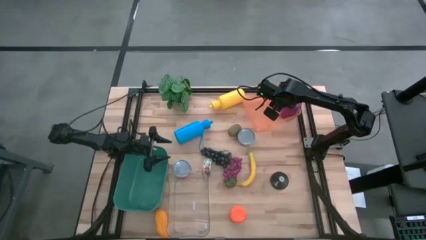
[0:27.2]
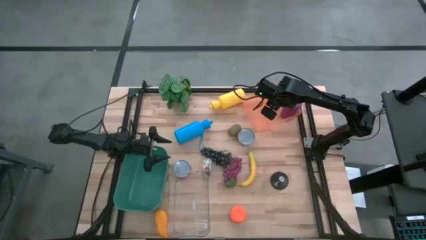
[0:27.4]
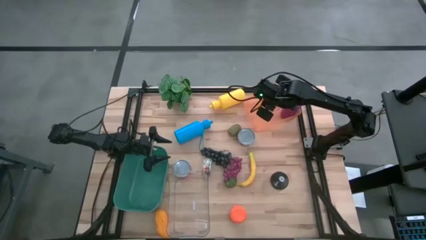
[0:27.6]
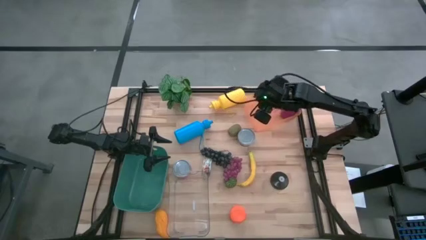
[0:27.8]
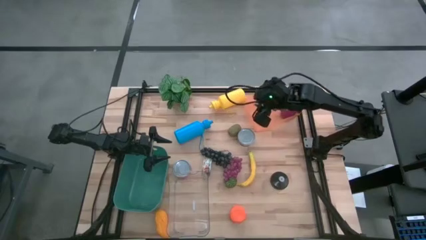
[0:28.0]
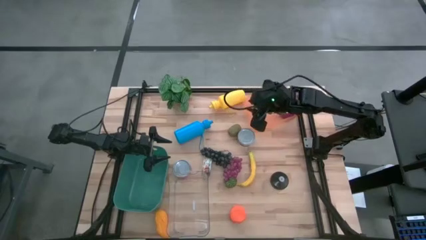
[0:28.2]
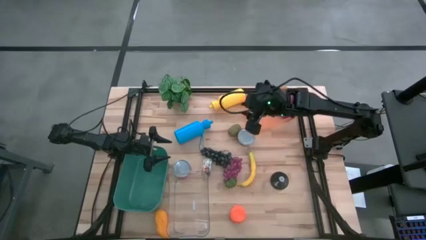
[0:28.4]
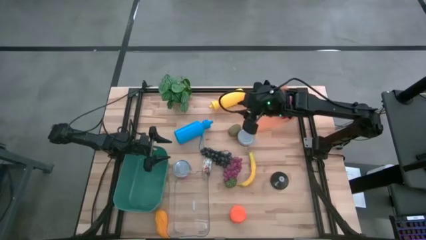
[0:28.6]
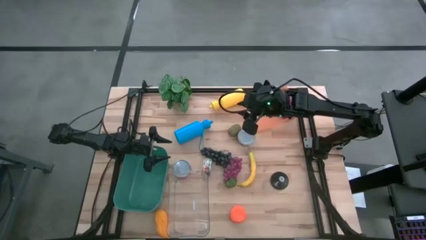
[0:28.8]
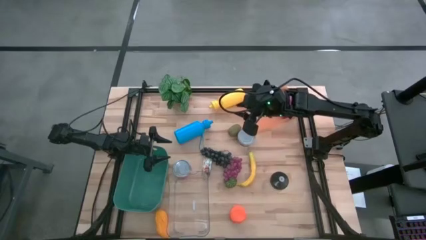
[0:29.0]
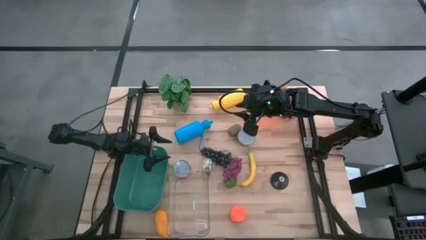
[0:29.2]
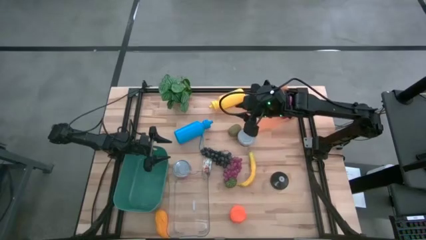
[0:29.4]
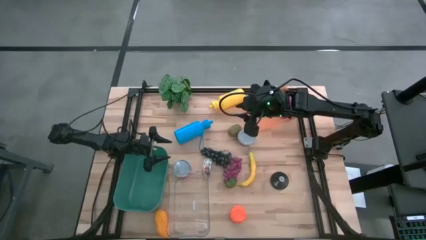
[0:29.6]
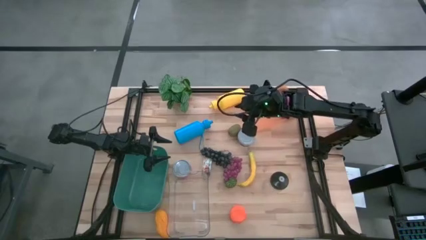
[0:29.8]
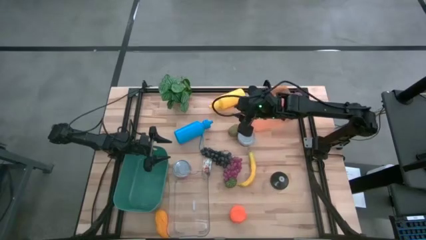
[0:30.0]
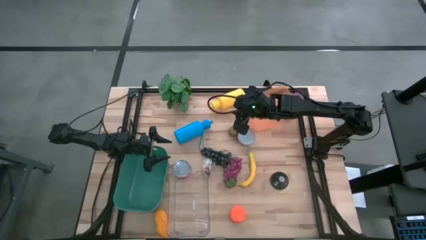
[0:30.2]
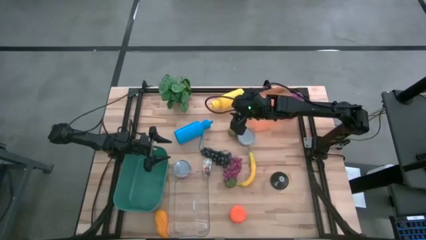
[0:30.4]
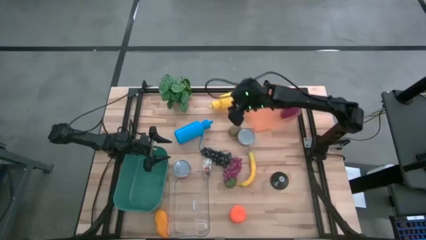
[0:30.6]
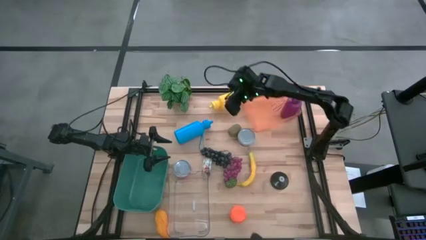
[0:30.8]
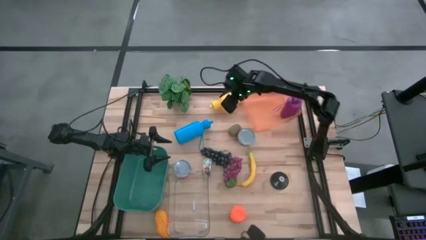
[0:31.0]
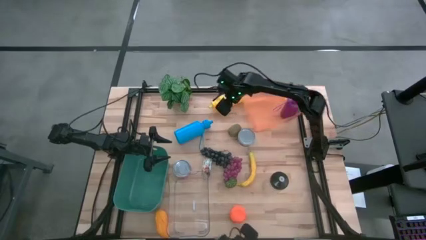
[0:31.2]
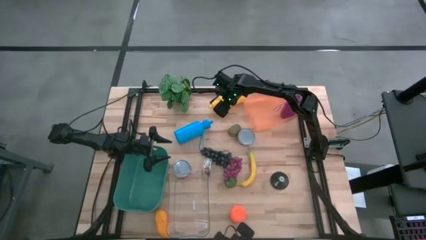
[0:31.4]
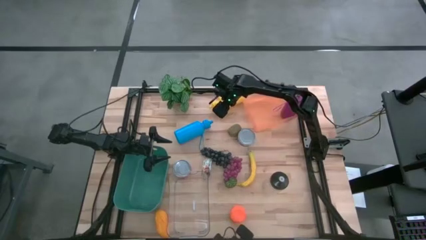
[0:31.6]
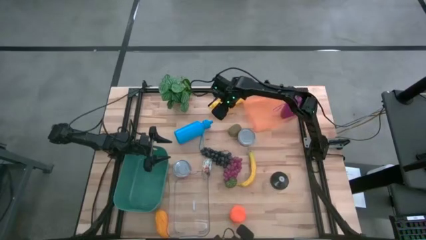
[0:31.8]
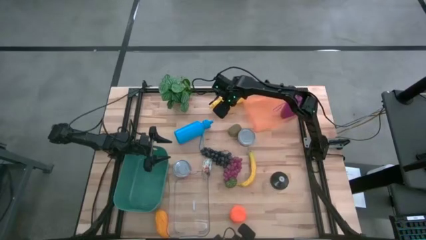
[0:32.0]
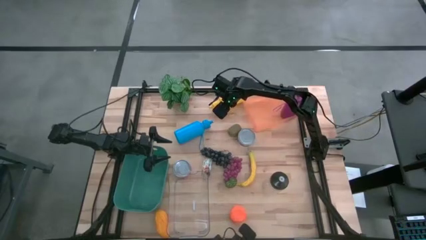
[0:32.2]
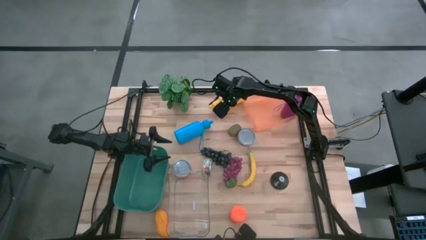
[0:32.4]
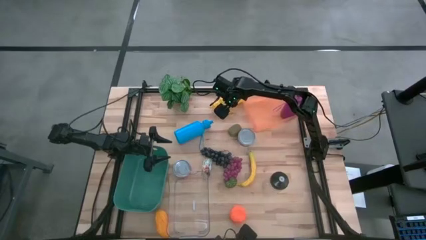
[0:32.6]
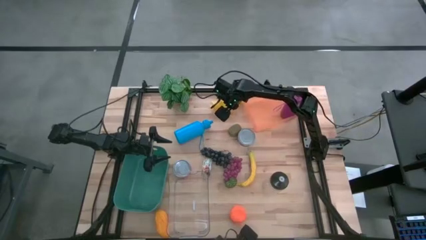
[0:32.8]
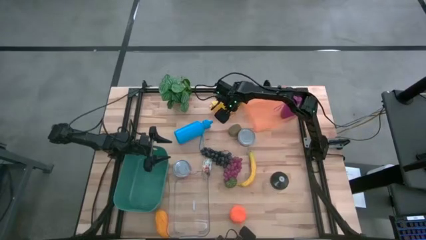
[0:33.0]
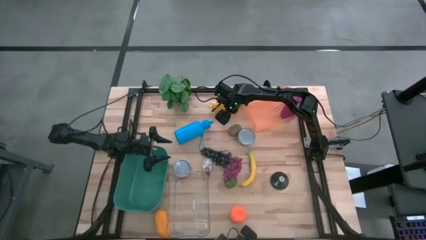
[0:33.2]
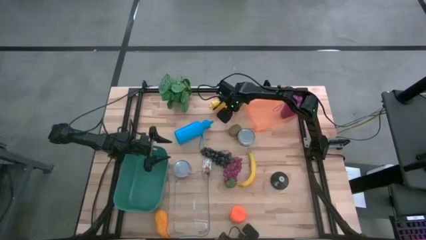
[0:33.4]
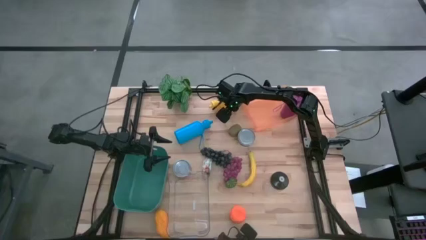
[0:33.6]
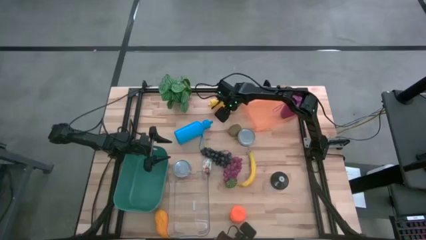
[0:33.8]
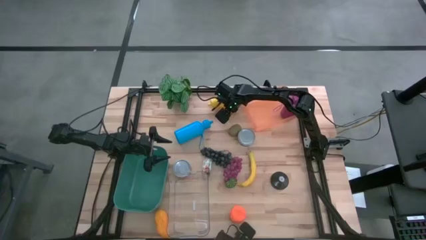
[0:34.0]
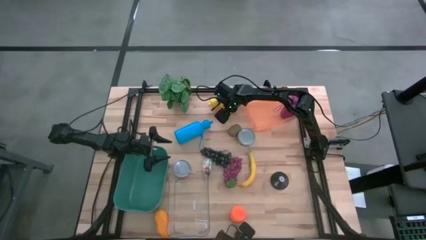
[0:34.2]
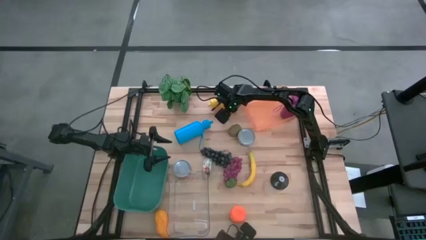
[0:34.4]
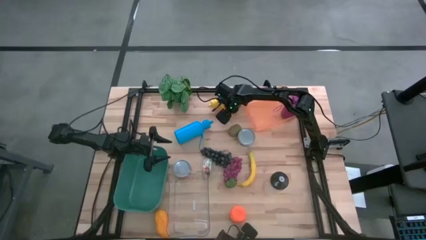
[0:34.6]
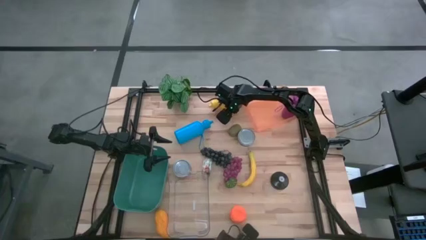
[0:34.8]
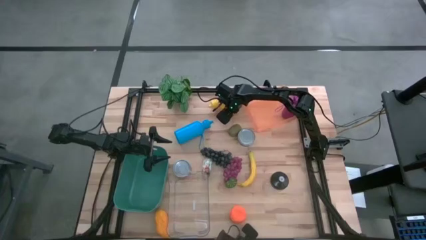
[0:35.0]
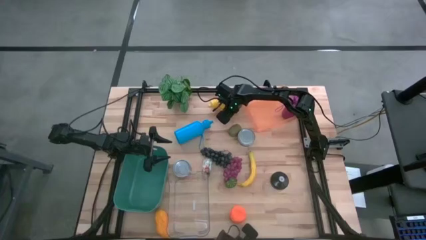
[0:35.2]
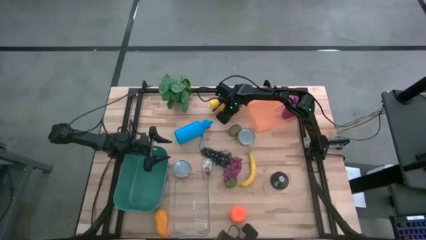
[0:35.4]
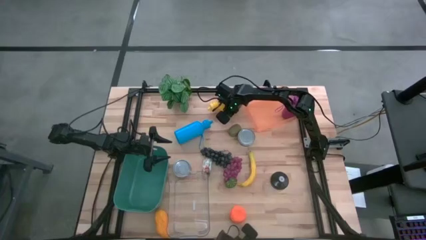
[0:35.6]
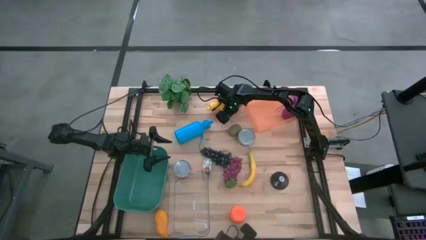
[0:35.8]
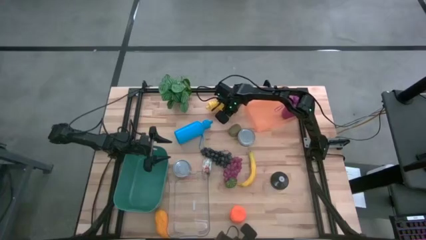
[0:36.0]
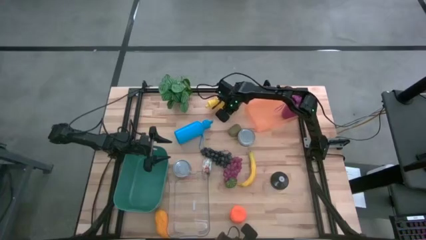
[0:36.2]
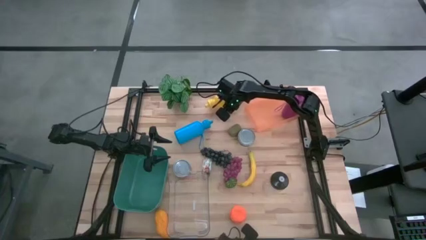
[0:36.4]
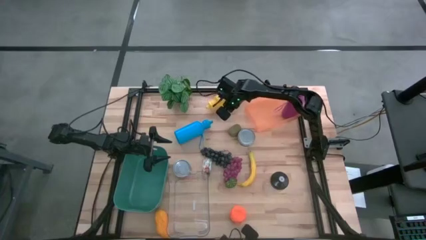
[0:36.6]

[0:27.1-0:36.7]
Task: Pick & Place Food Item
Put the yellow tumbler into the orange bin

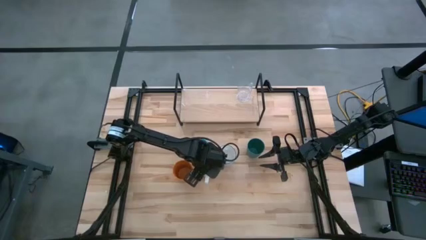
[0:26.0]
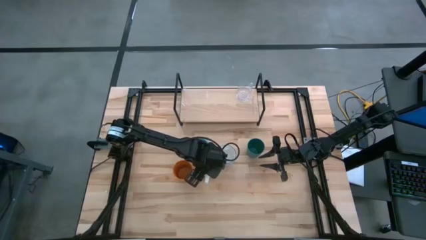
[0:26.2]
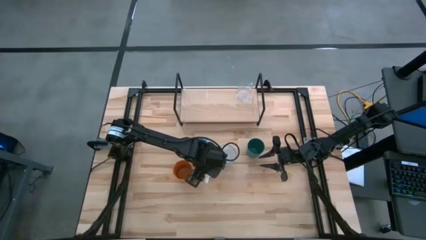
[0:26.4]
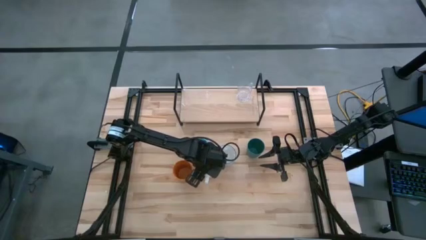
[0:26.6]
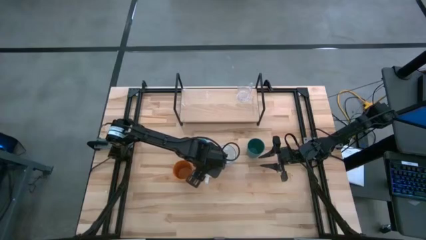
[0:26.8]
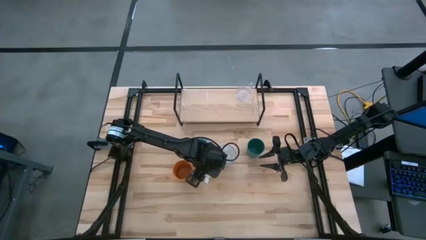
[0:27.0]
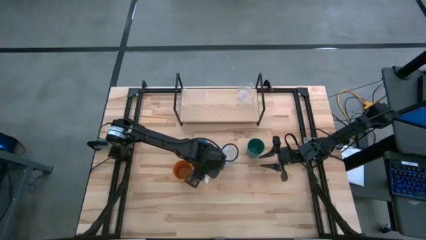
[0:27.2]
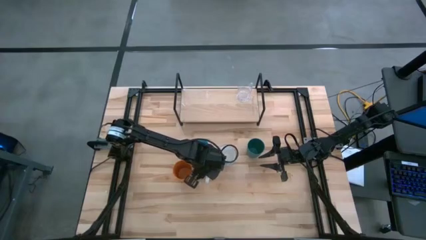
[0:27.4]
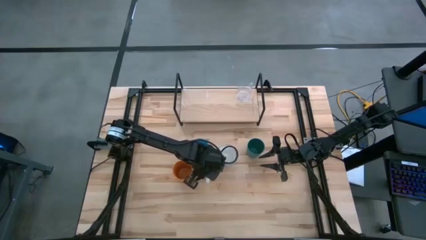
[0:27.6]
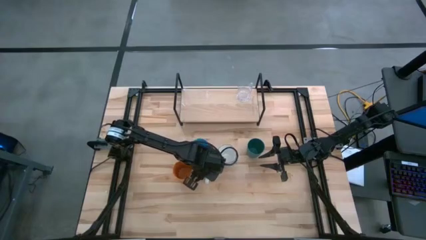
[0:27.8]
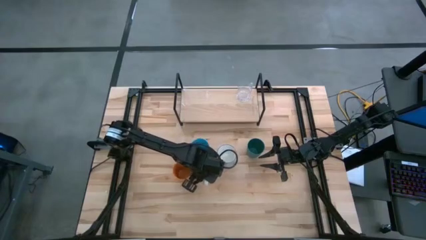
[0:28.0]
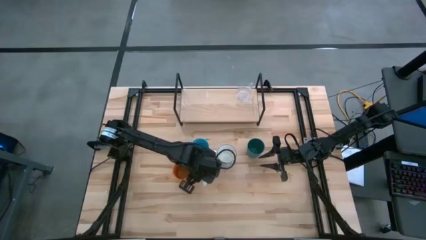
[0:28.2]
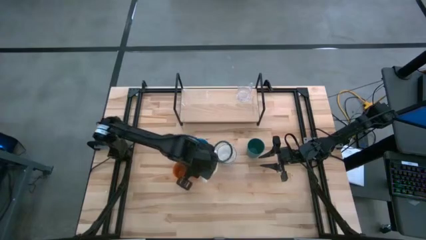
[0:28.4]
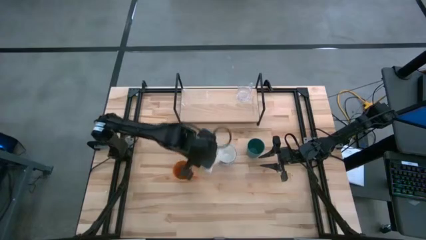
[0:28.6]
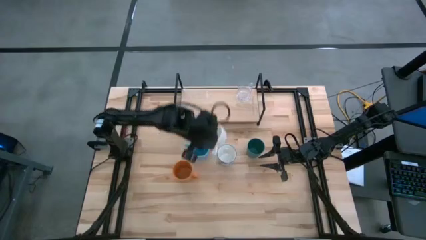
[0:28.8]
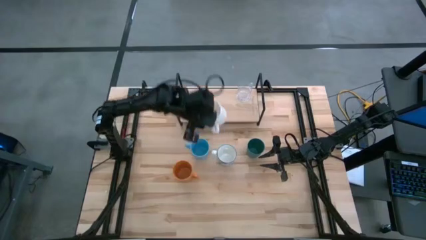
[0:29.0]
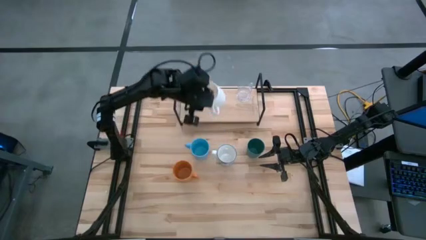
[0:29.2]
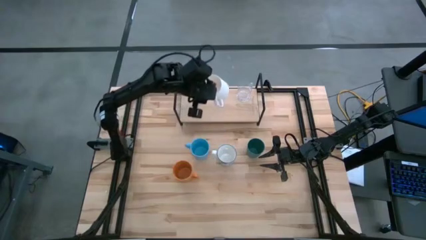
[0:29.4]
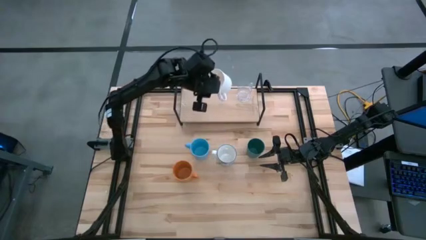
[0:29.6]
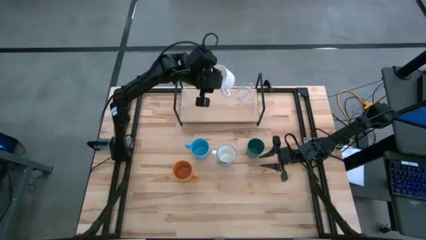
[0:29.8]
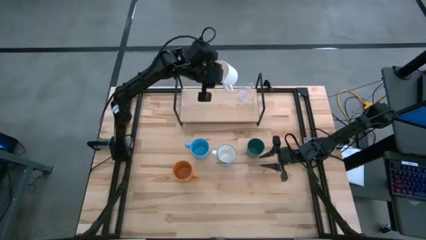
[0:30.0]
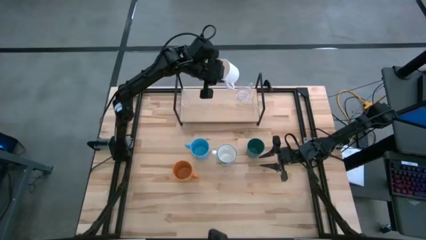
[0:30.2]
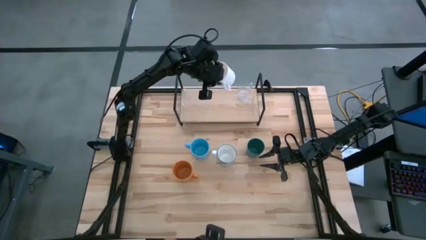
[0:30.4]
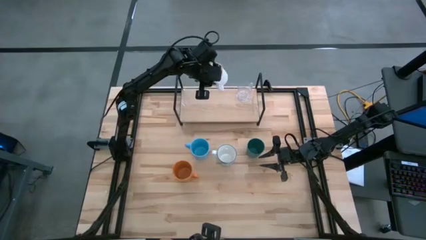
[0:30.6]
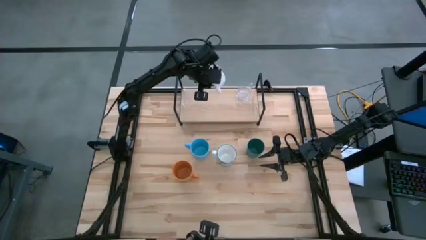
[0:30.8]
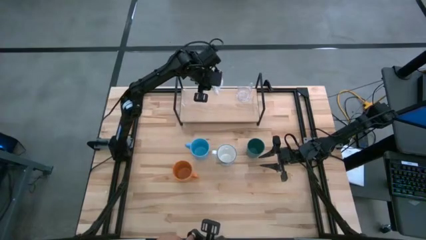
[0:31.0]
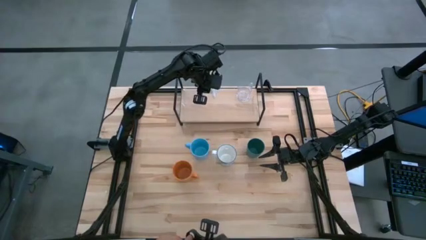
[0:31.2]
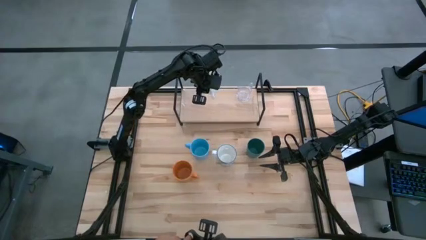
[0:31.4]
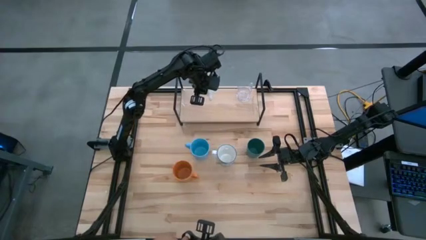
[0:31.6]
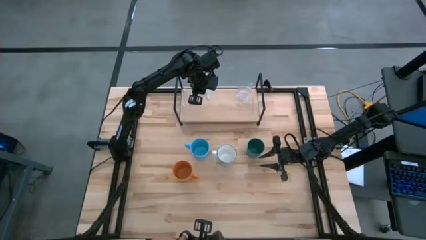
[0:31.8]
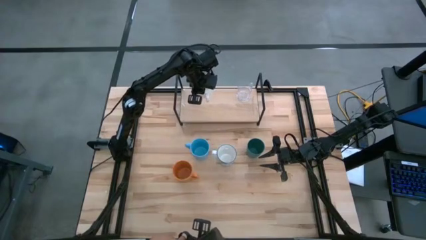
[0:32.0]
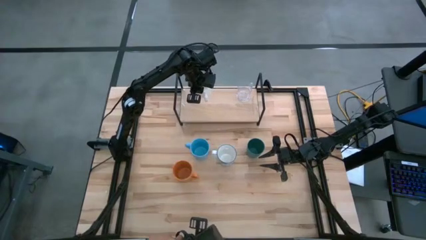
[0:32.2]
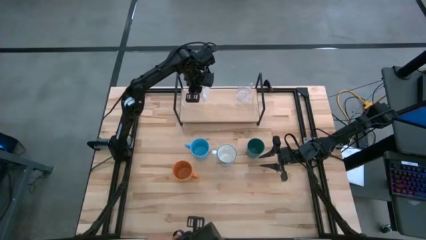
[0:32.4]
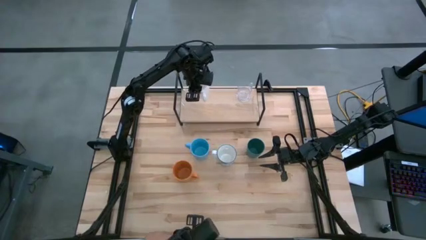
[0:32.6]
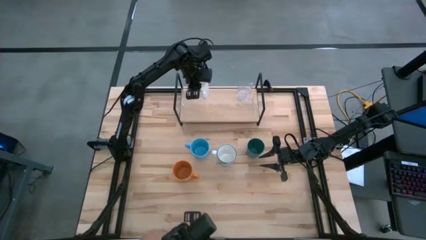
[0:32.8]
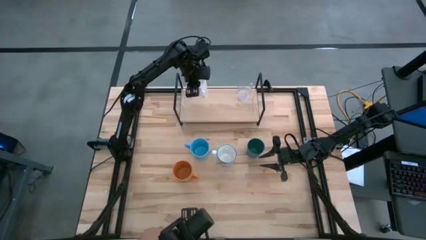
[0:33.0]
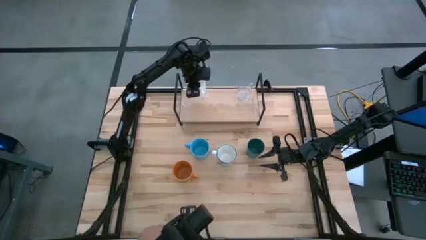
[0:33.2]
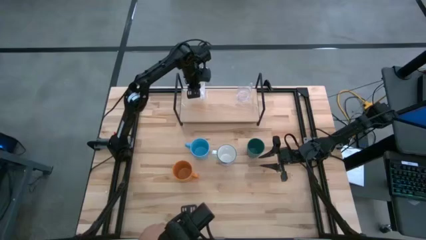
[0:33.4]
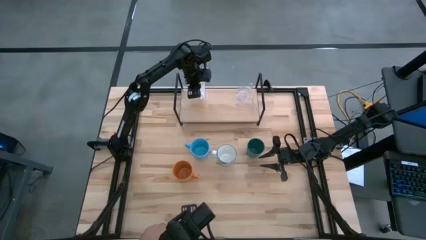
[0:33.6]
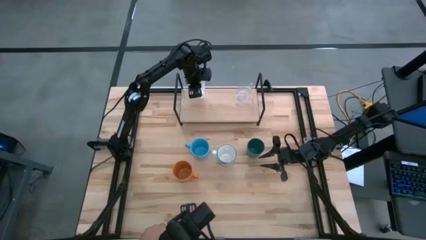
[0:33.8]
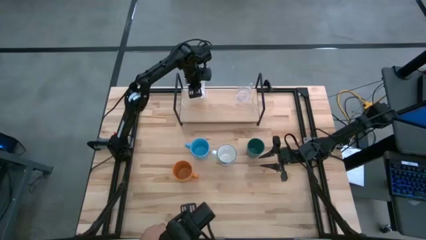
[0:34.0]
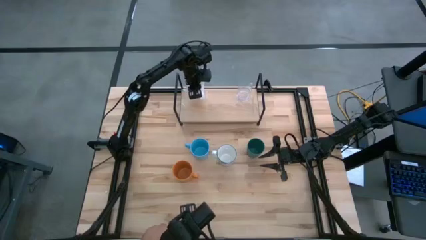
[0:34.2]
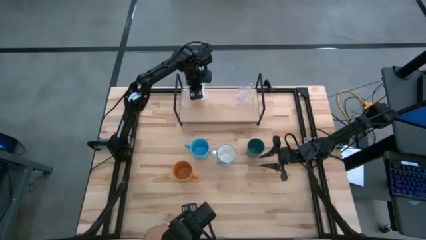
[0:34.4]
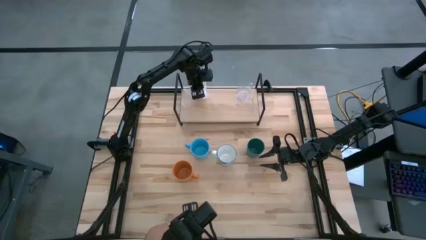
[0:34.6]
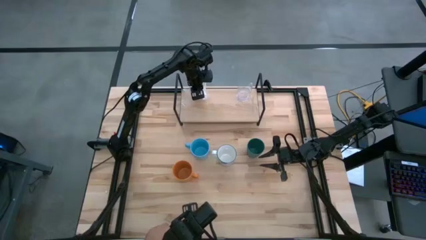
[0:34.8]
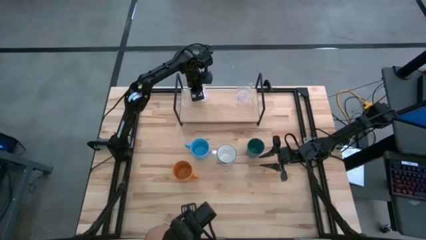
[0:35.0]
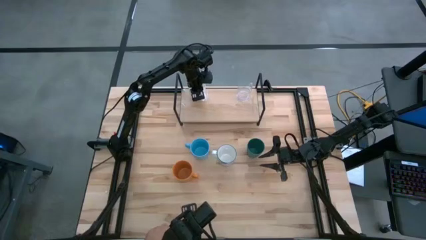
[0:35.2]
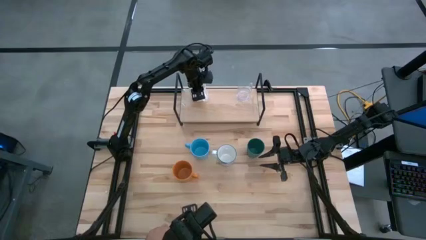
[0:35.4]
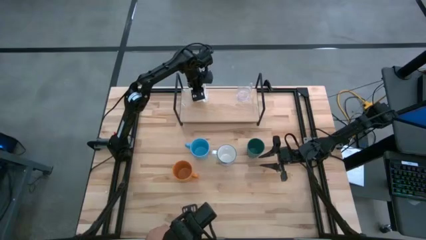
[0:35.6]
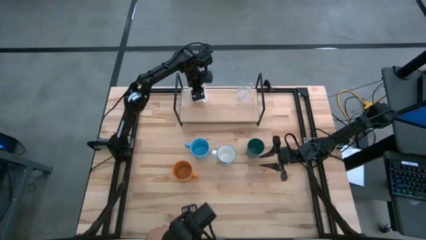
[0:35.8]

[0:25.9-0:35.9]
Task: Stack small to large cups/mugs on shelf
Put the white mug on the shelf
